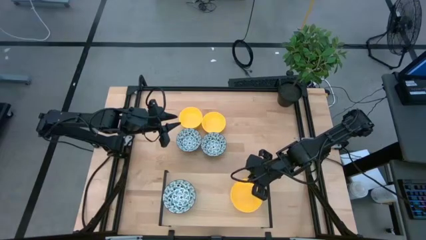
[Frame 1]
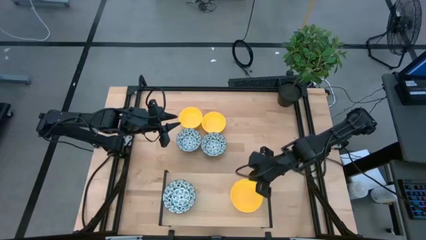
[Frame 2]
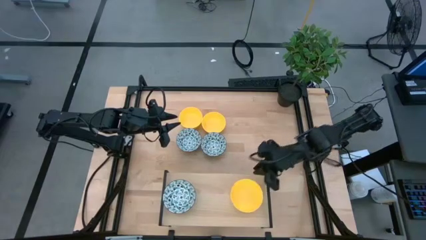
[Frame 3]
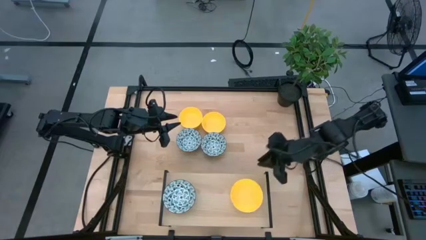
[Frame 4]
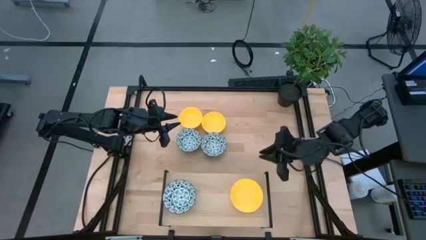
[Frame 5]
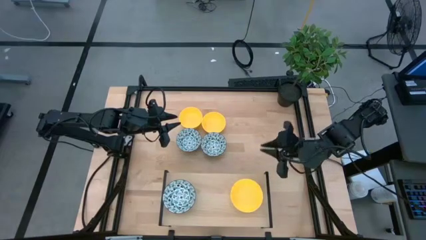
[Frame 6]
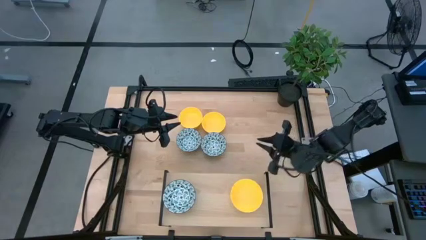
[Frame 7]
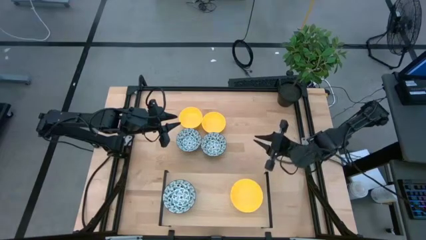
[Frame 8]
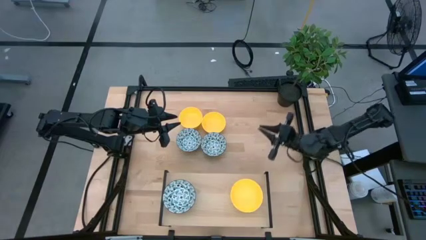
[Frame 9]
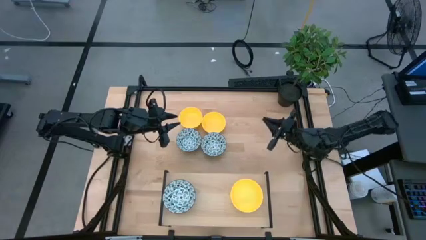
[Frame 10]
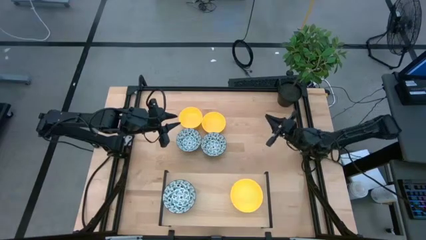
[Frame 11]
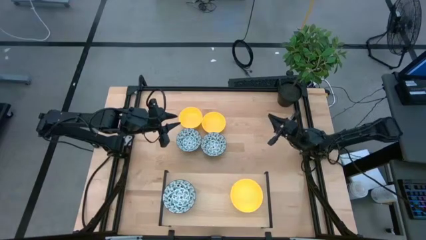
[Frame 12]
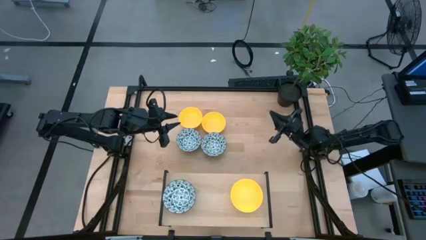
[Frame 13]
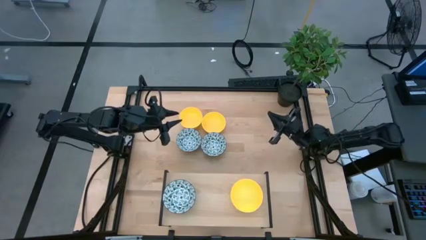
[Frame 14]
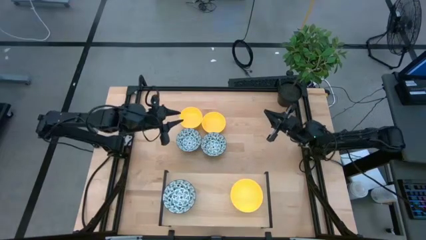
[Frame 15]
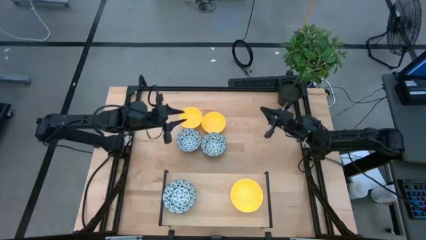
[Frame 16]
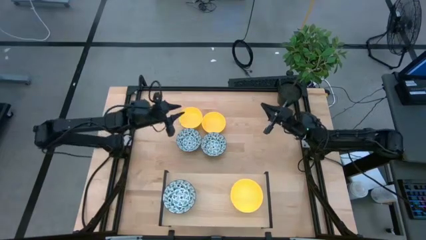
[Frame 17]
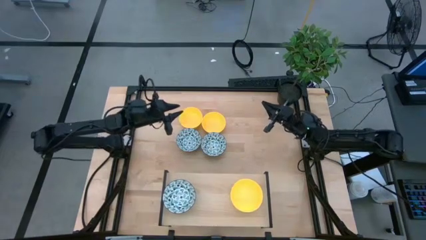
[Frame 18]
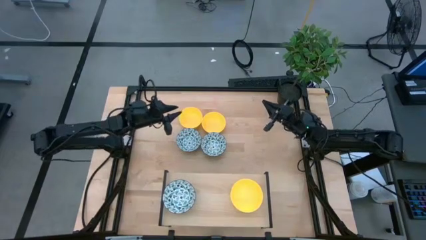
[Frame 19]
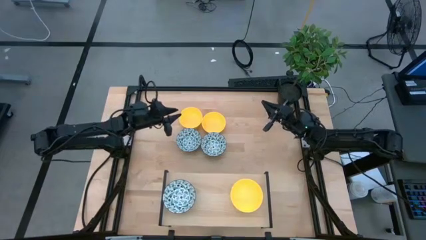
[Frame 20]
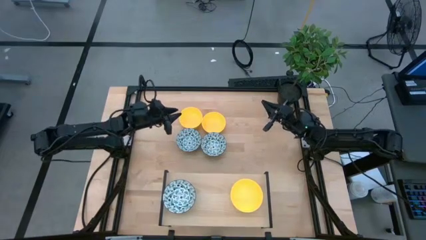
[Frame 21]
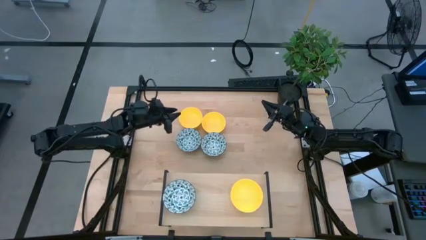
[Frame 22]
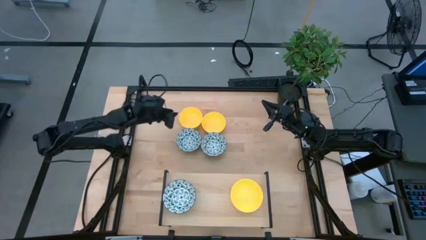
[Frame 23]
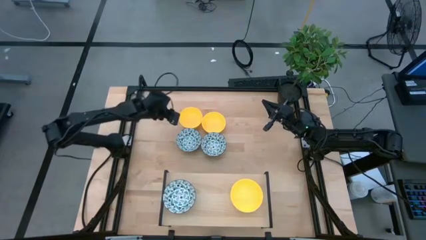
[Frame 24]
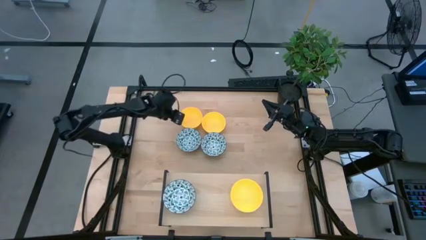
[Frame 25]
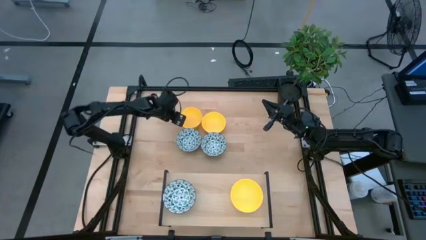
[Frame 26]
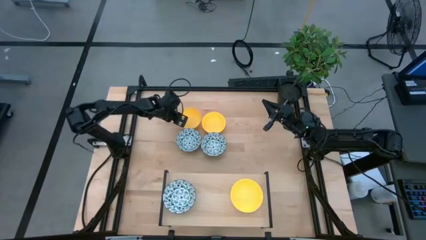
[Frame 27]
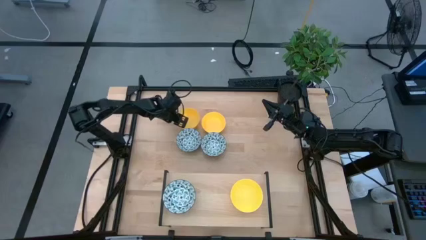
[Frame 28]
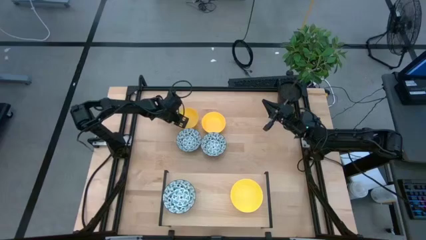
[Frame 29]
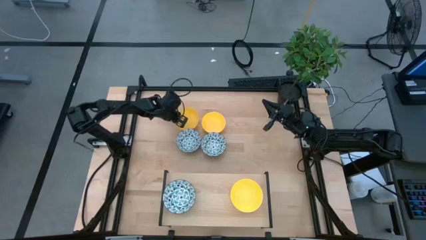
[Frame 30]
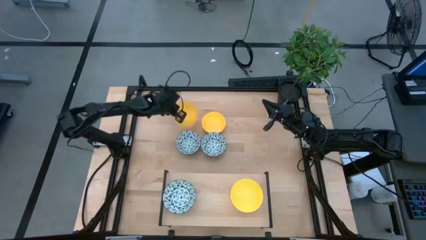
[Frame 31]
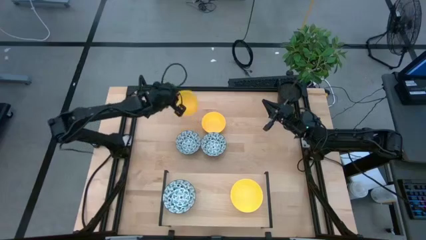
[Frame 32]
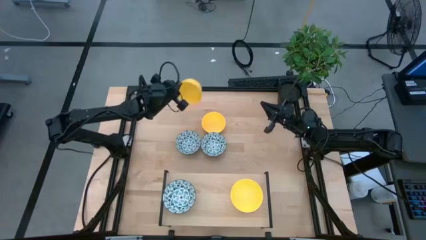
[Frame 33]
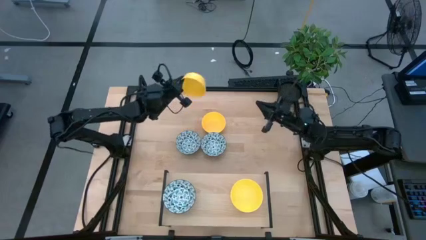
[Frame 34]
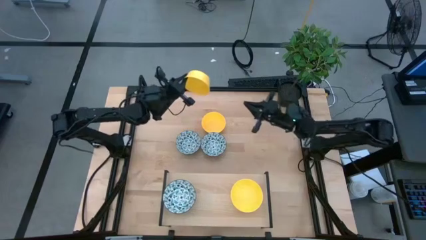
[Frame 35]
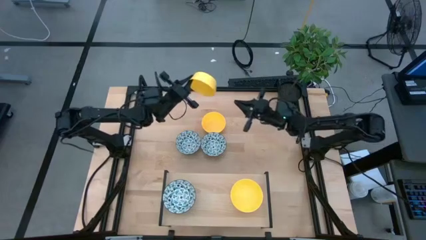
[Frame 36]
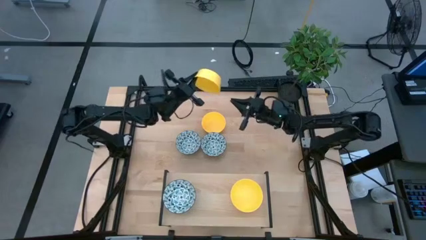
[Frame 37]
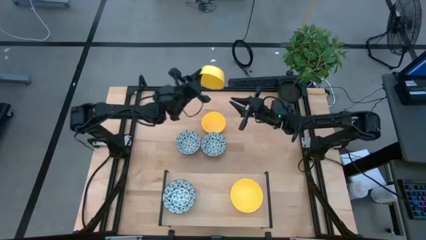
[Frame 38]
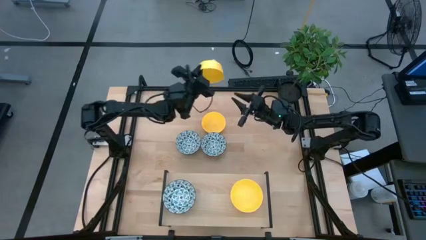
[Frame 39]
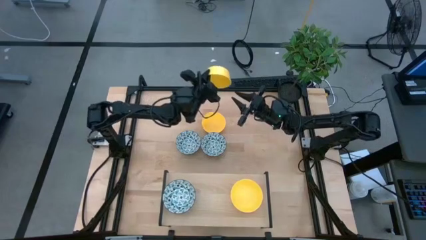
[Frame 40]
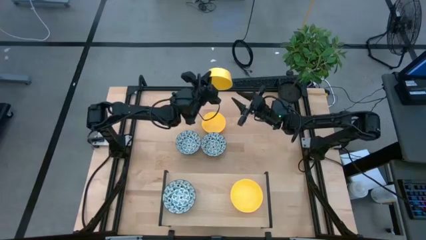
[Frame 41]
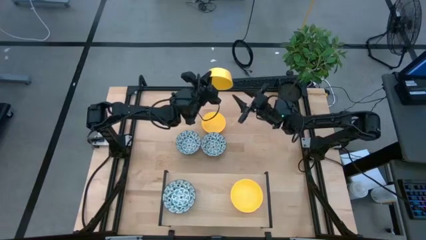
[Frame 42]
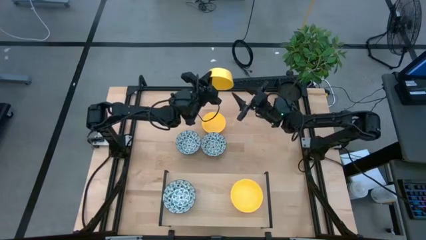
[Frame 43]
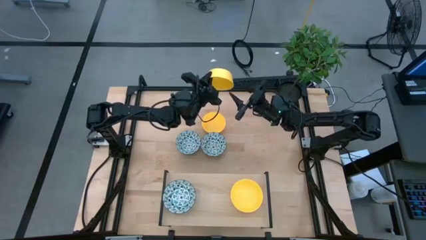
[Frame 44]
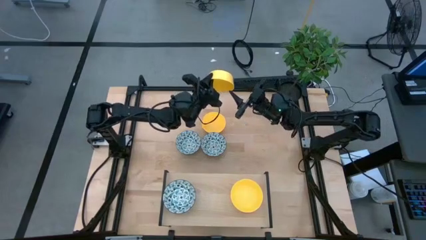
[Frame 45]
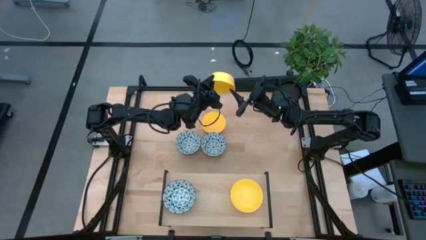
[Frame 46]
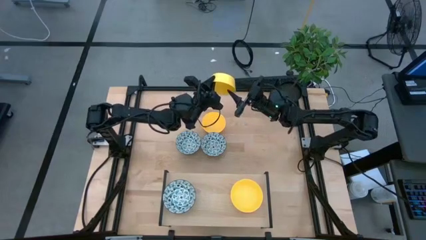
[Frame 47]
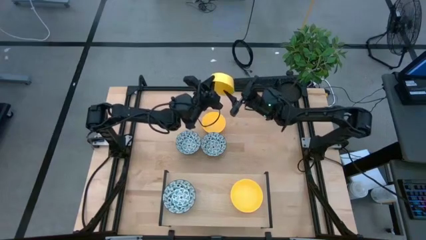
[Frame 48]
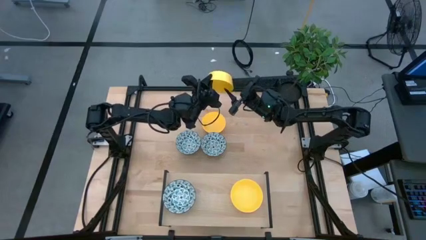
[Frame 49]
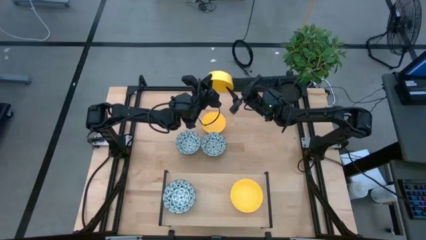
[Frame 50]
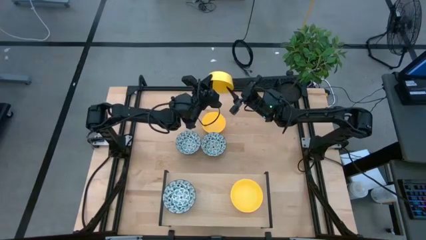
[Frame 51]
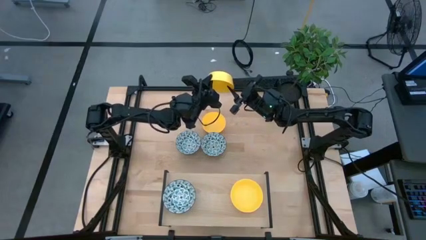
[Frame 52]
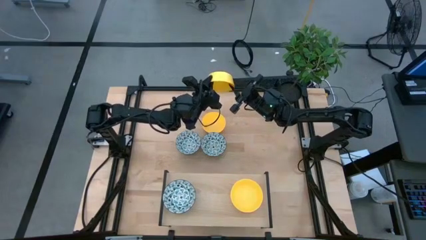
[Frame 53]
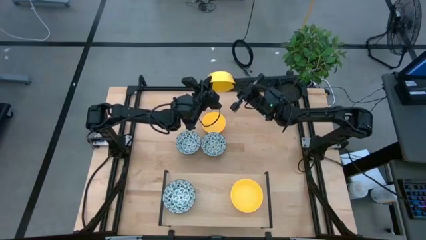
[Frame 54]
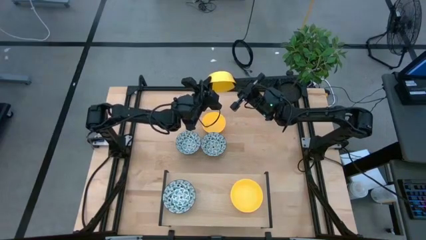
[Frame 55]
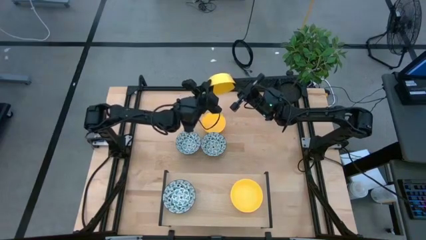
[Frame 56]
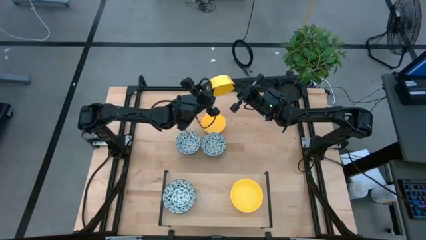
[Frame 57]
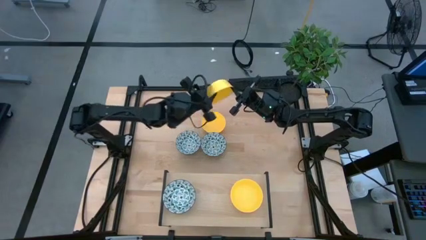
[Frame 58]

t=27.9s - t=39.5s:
Task: Pick & Place Mini bowls
Stack the left yellow bowl on the yellow bowl on the shelf
